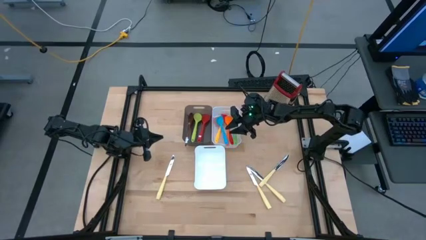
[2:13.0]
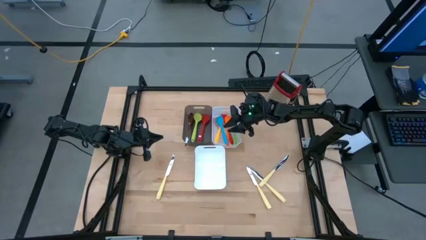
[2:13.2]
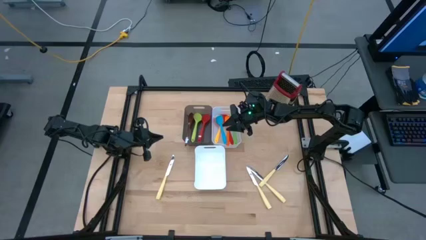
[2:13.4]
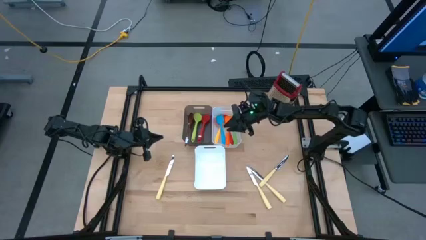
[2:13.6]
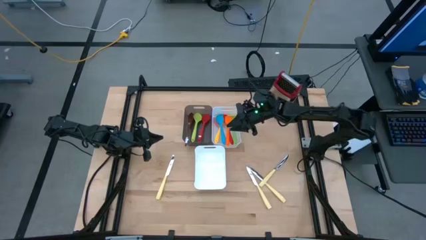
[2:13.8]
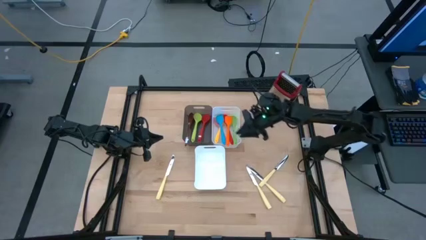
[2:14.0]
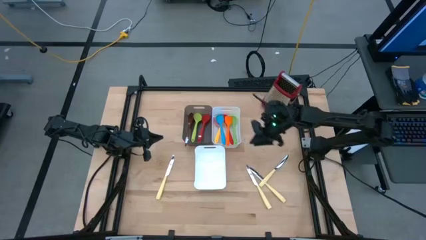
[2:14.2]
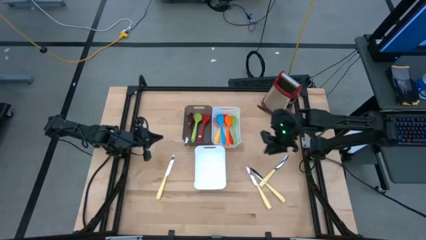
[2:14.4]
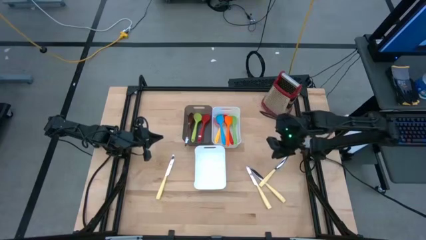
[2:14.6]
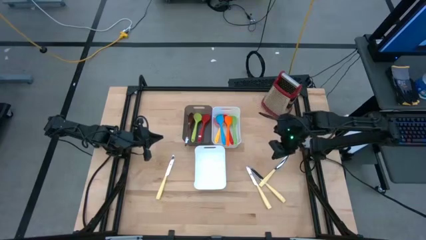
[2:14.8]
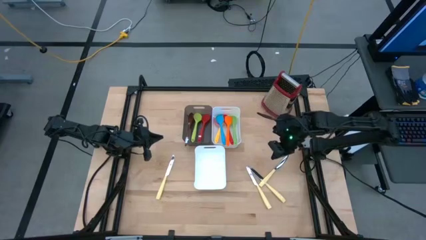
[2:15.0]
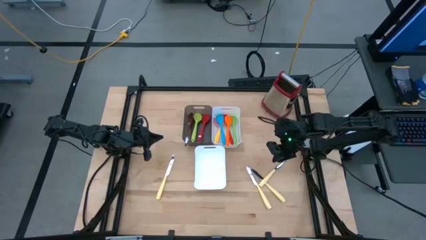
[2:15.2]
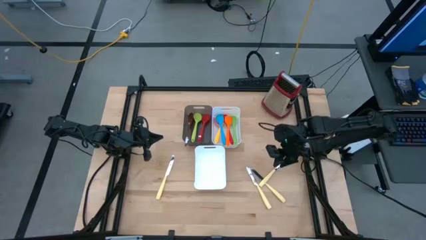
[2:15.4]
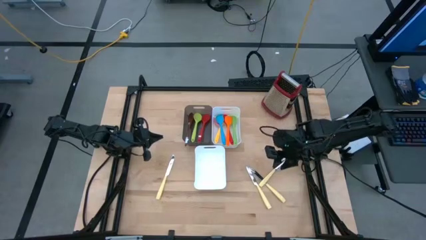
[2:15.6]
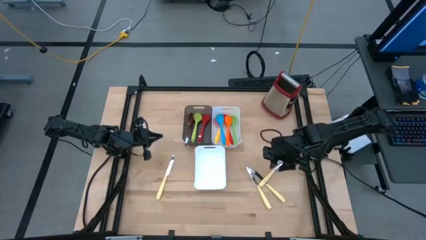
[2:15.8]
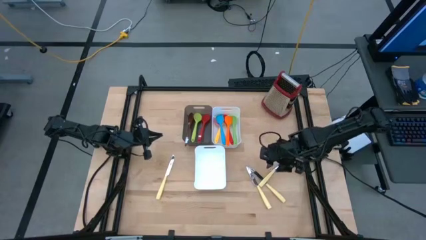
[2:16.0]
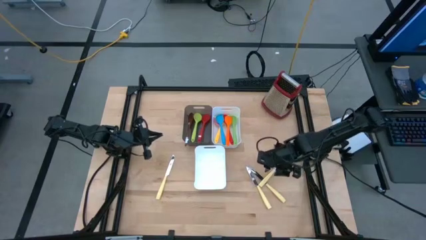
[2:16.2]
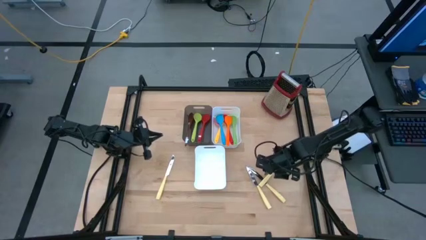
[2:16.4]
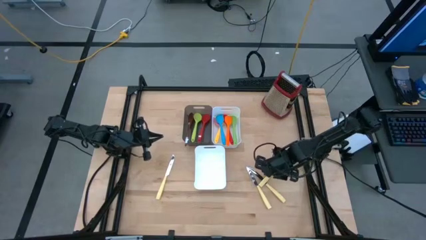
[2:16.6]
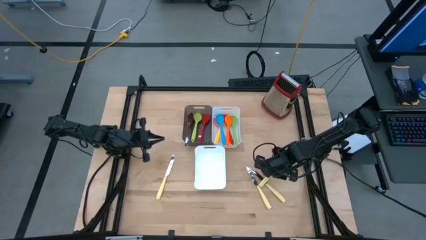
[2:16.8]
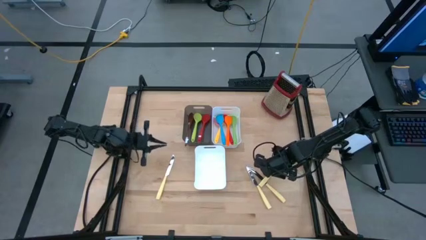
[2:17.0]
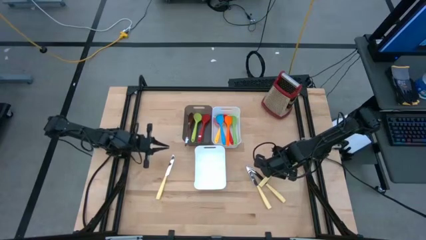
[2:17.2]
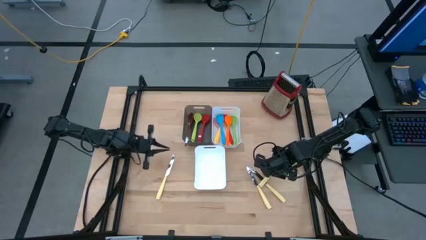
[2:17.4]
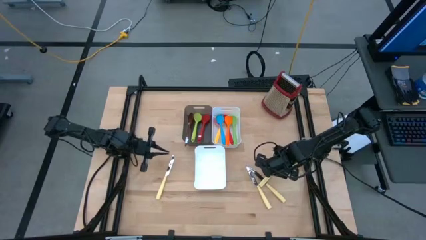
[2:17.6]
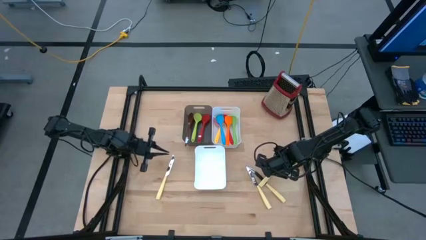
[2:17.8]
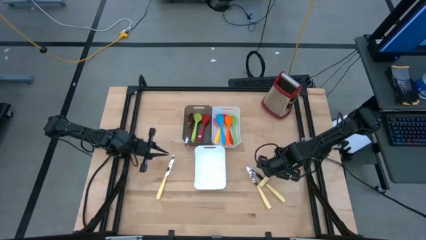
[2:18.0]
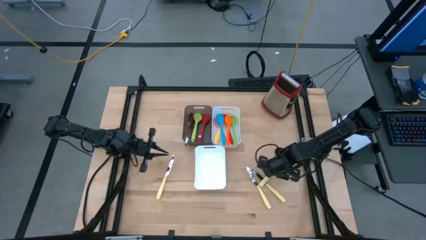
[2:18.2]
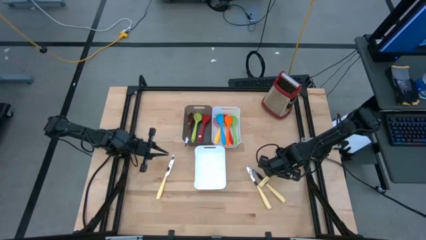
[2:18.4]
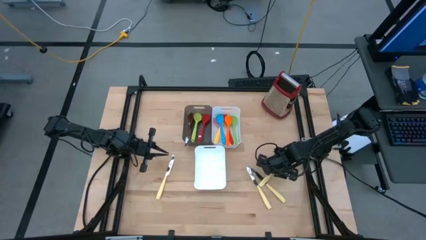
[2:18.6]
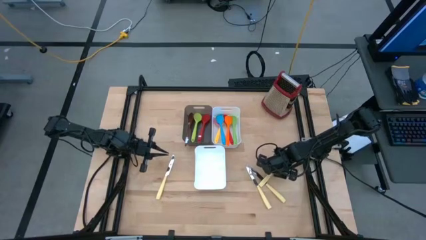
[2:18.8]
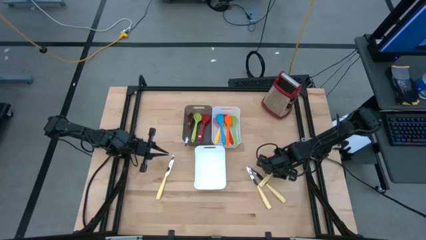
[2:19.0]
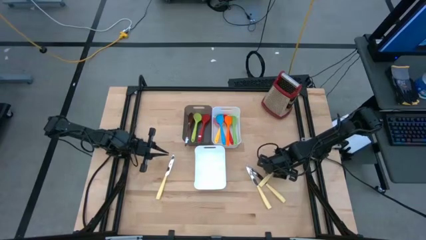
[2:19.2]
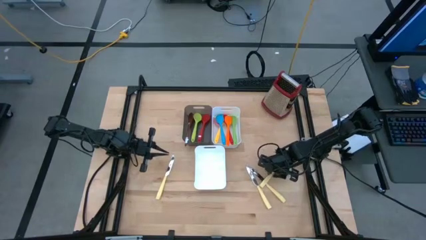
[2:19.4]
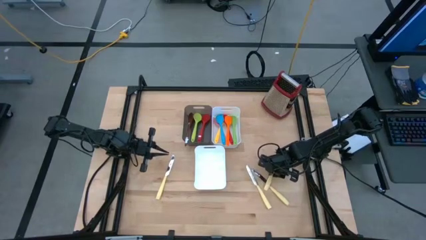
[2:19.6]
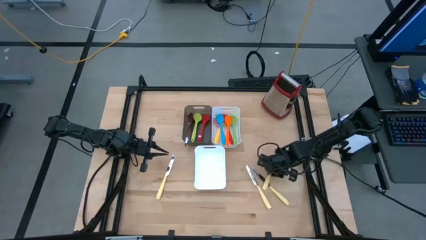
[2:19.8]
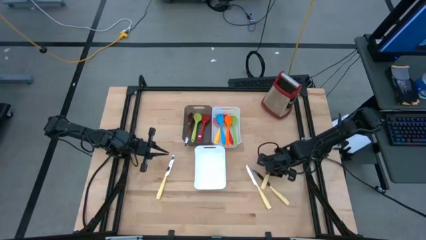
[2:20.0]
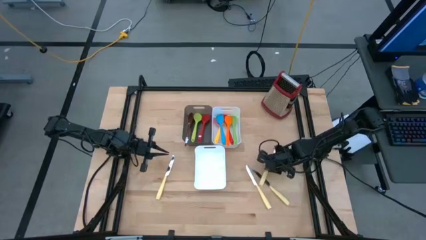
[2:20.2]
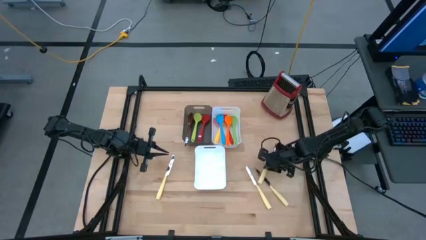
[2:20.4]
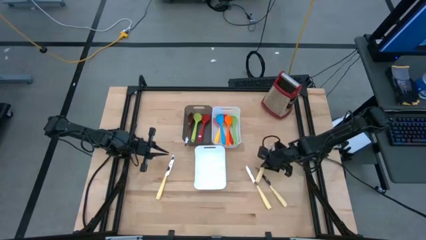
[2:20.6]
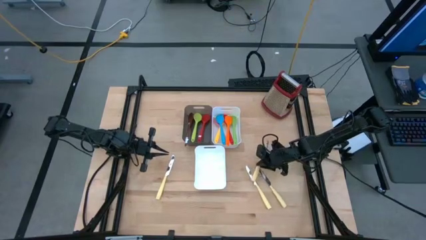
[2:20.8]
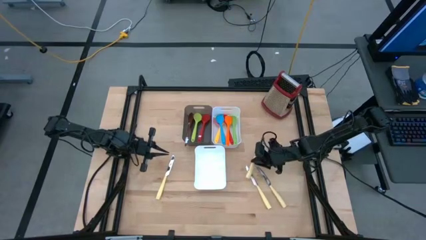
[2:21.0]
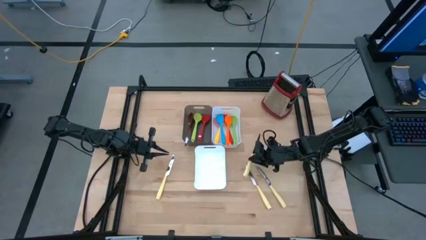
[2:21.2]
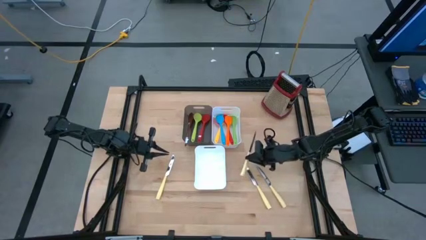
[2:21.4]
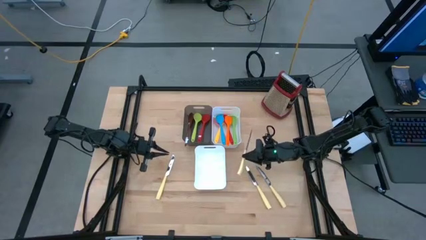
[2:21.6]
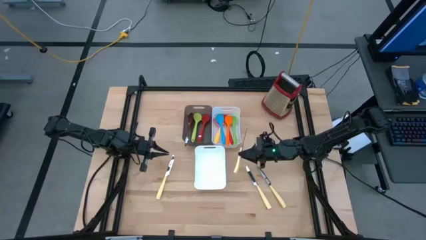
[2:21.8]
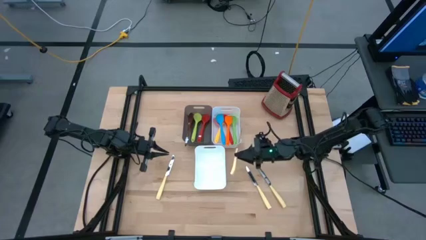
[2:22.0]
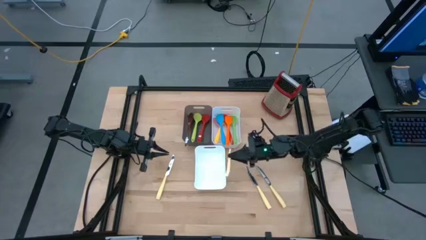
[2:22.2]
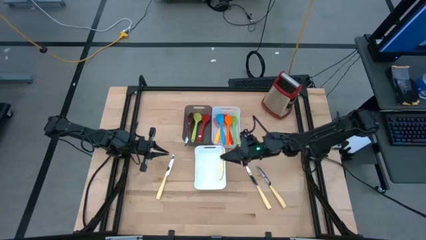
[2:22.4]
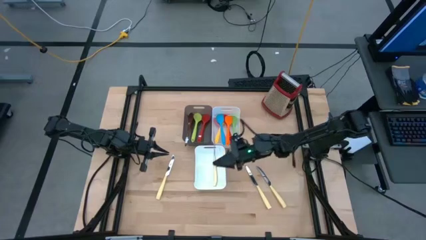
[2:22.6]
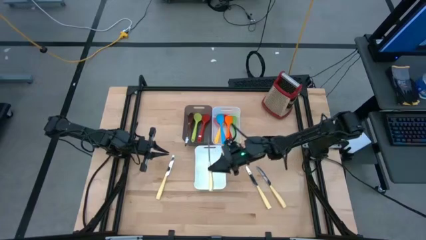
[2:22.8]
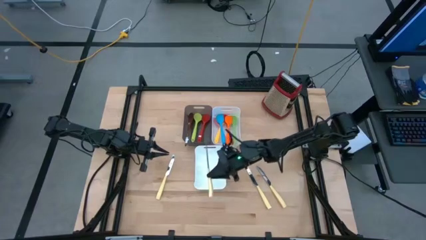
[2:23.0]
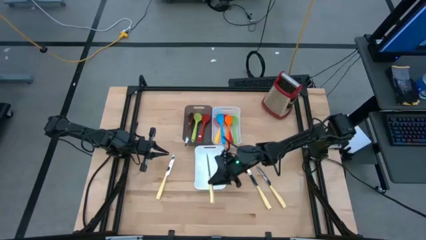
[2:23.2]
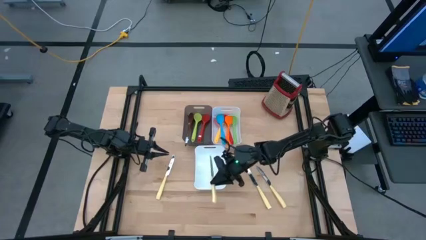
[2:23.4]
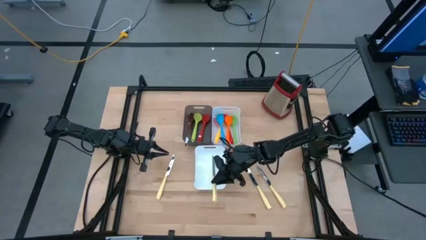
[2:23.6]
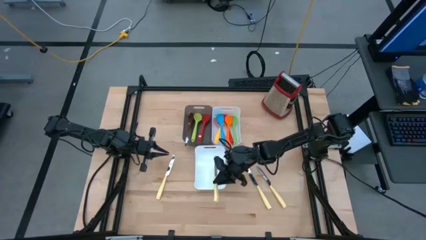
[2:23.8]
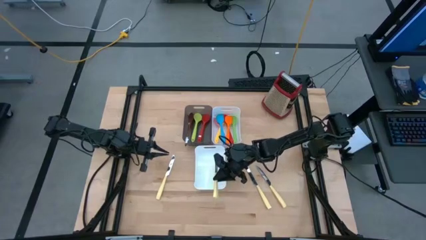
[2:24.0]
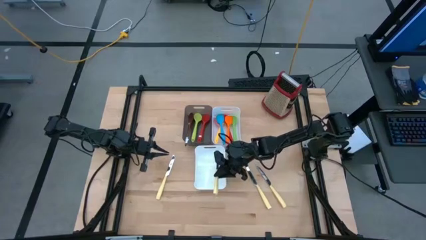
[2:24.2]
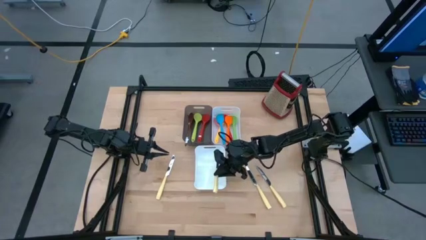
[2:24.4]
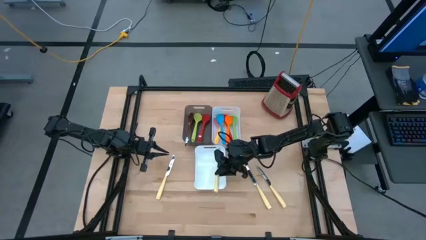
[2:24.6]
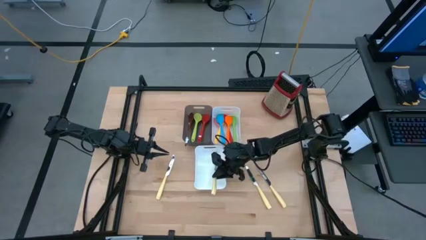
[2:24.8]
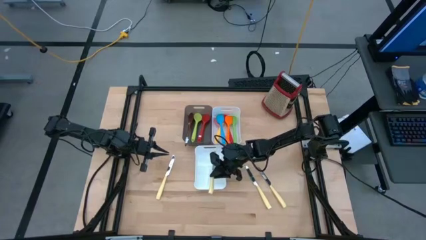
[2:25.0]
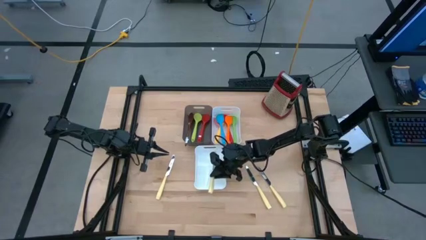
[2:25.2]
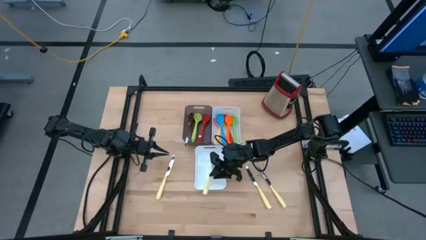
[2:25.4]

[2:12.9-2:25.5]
Task: Pick & Place Kitchen Items
Put the yellow knife into the bottom white bin
